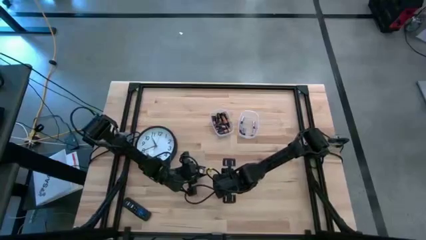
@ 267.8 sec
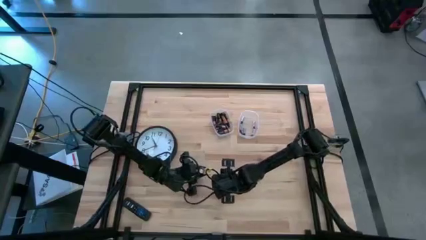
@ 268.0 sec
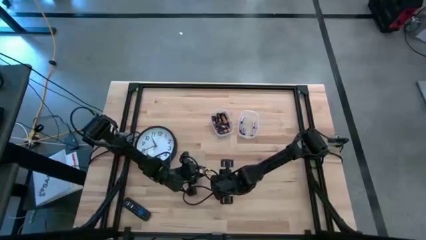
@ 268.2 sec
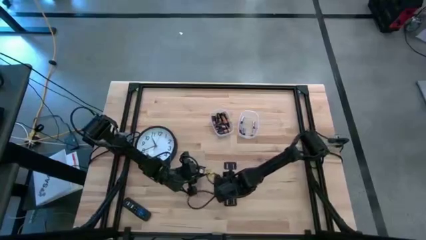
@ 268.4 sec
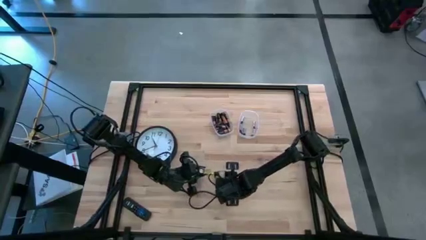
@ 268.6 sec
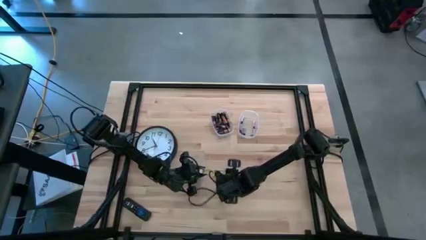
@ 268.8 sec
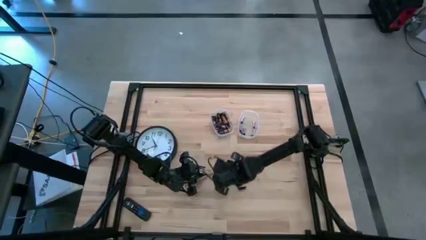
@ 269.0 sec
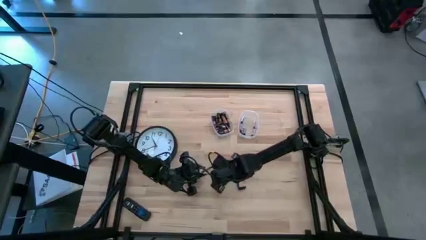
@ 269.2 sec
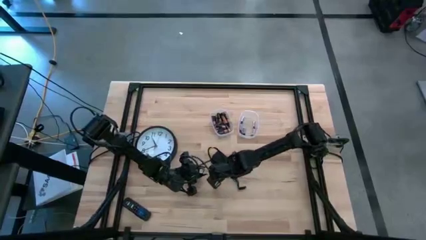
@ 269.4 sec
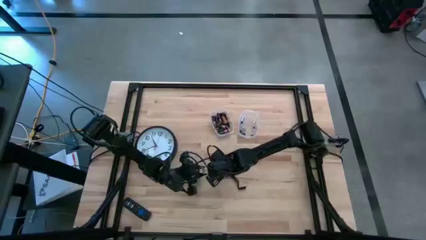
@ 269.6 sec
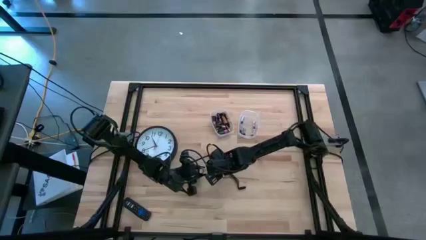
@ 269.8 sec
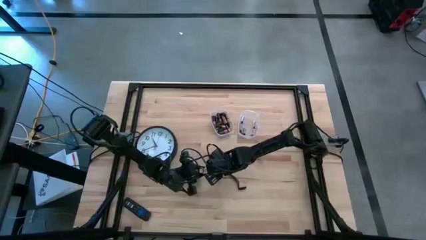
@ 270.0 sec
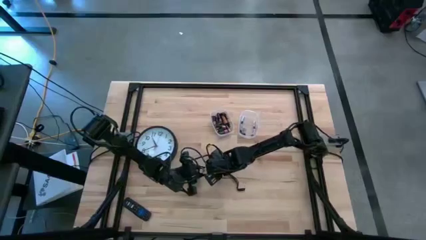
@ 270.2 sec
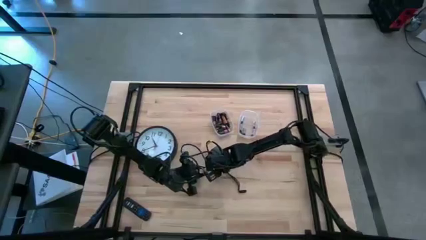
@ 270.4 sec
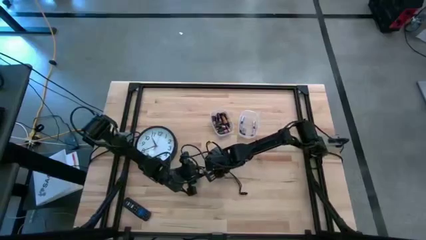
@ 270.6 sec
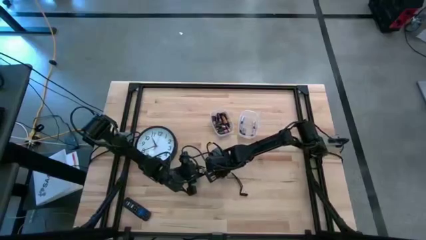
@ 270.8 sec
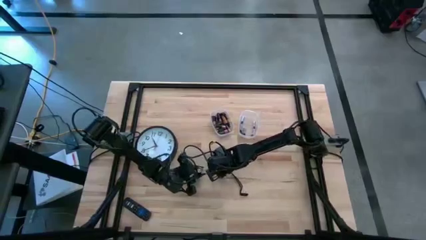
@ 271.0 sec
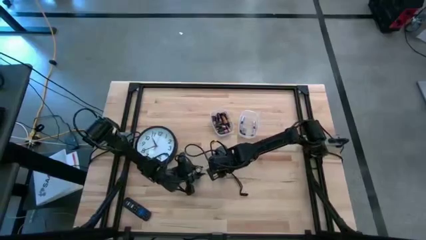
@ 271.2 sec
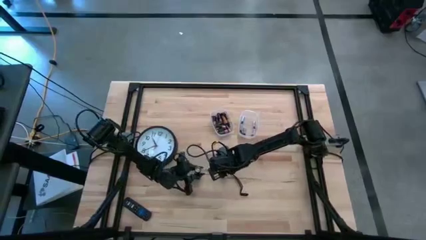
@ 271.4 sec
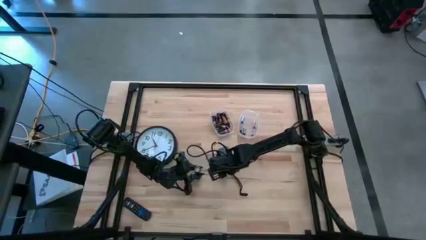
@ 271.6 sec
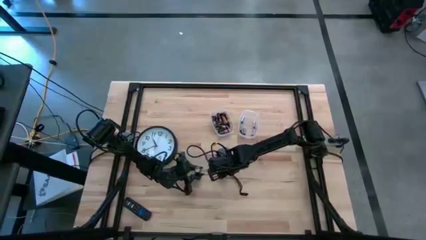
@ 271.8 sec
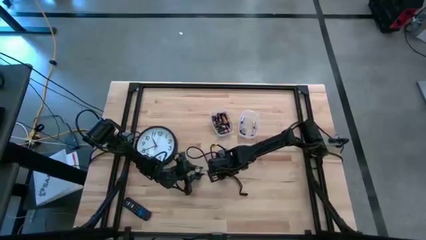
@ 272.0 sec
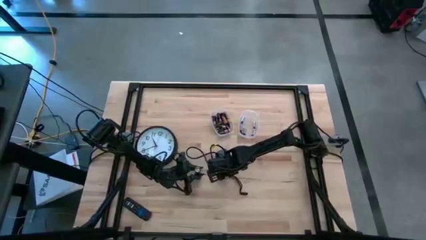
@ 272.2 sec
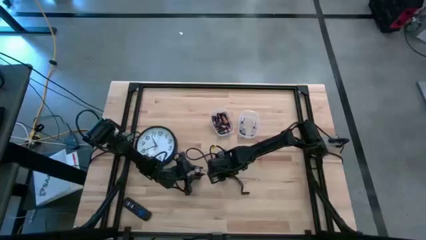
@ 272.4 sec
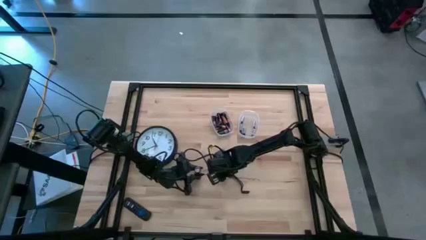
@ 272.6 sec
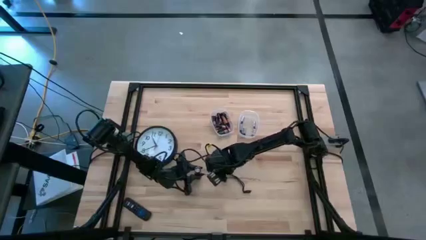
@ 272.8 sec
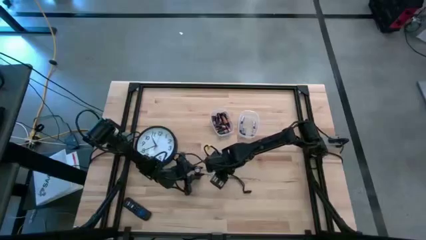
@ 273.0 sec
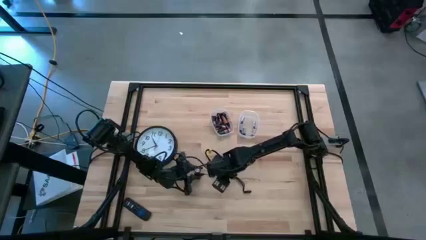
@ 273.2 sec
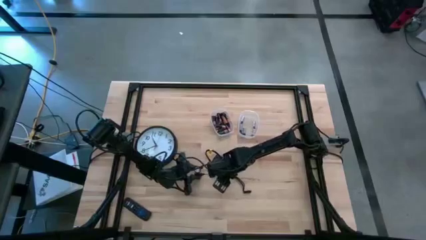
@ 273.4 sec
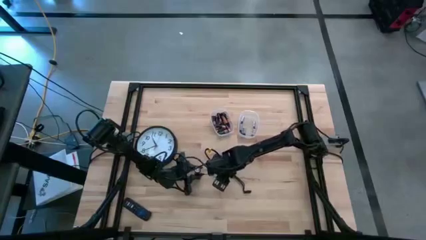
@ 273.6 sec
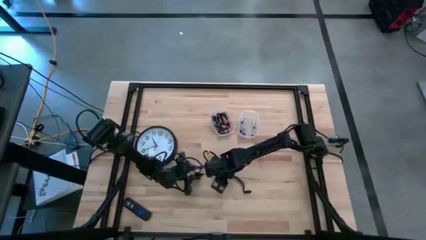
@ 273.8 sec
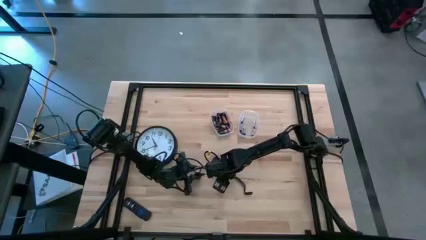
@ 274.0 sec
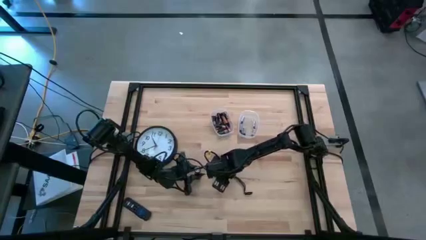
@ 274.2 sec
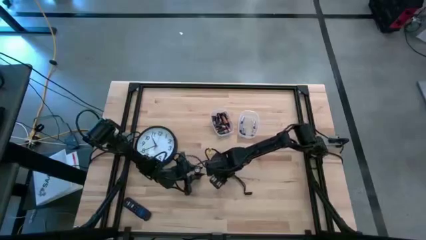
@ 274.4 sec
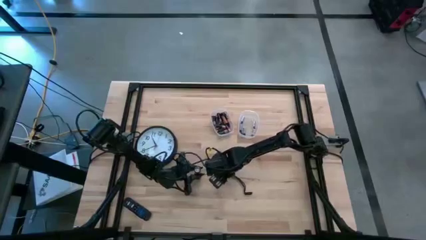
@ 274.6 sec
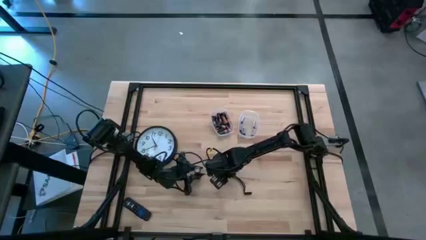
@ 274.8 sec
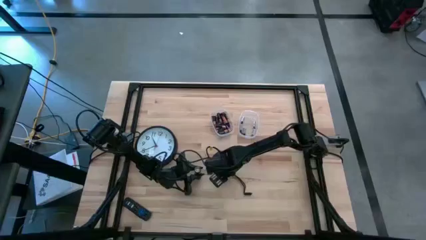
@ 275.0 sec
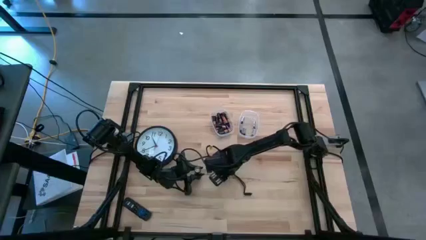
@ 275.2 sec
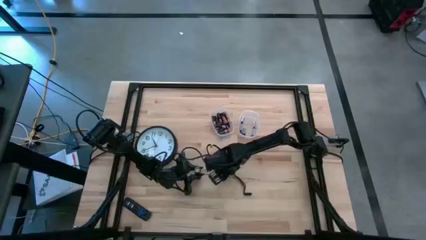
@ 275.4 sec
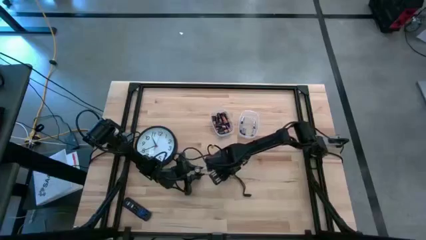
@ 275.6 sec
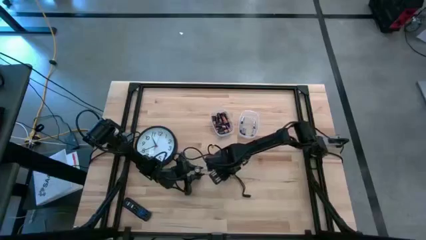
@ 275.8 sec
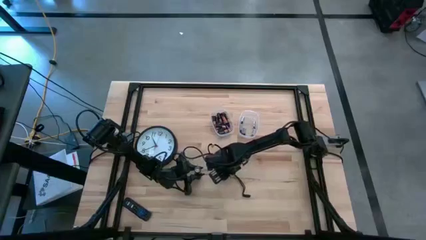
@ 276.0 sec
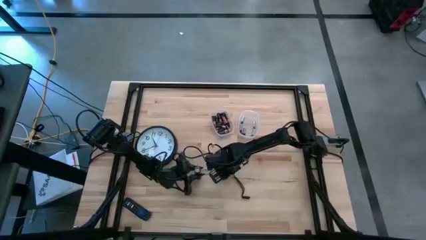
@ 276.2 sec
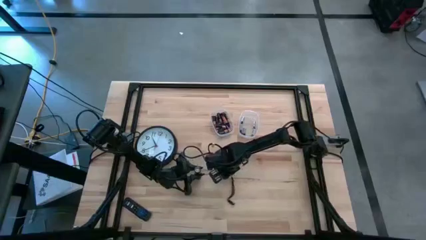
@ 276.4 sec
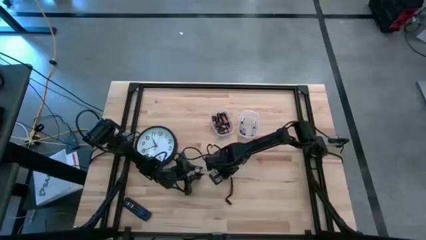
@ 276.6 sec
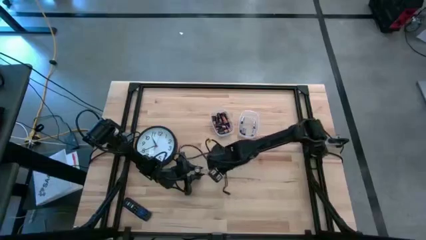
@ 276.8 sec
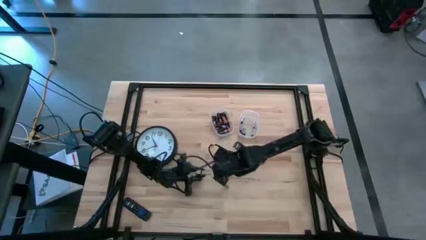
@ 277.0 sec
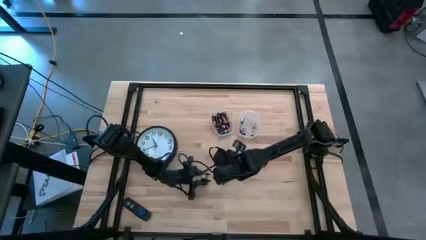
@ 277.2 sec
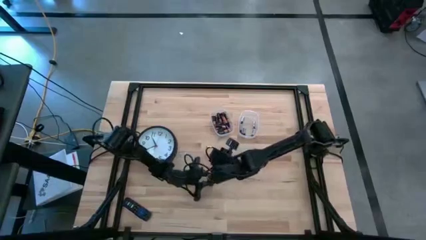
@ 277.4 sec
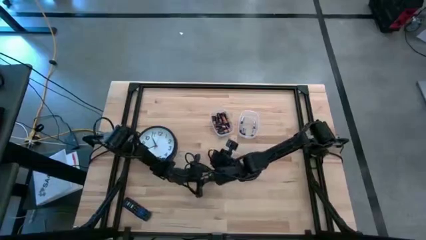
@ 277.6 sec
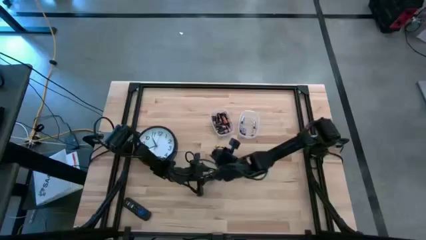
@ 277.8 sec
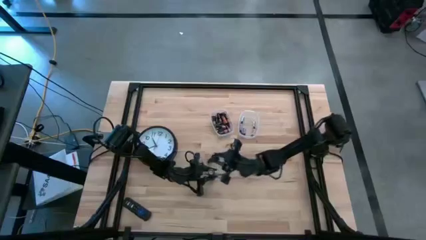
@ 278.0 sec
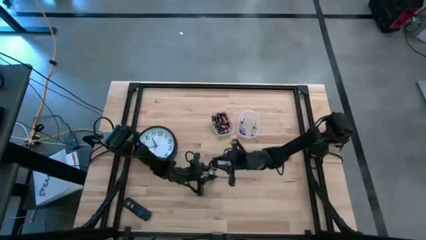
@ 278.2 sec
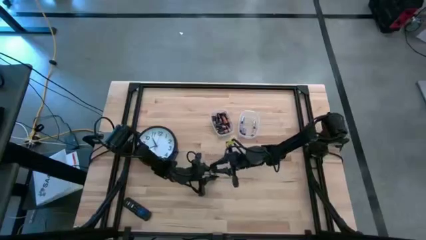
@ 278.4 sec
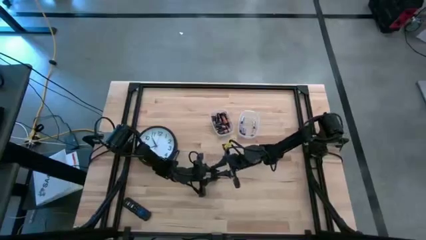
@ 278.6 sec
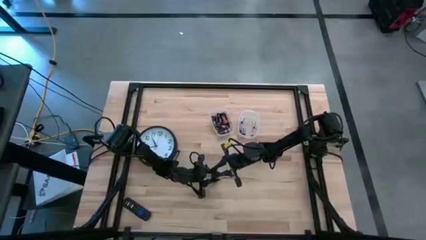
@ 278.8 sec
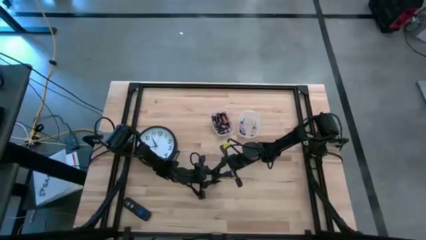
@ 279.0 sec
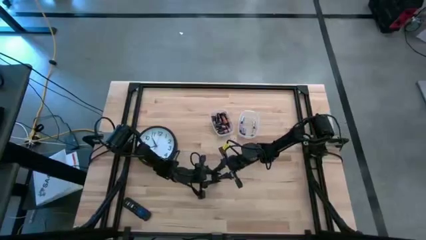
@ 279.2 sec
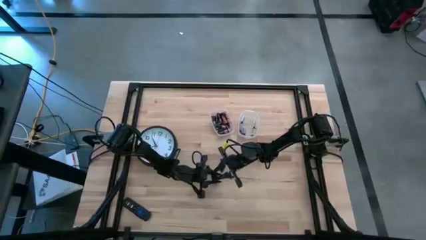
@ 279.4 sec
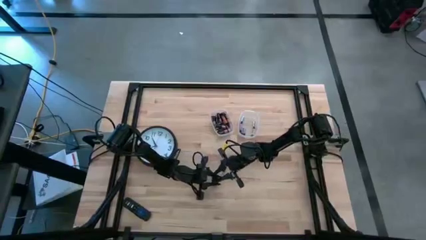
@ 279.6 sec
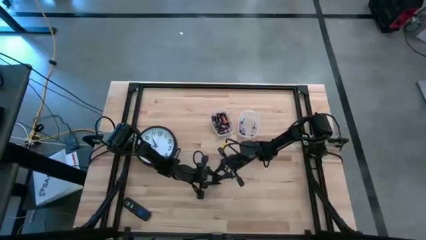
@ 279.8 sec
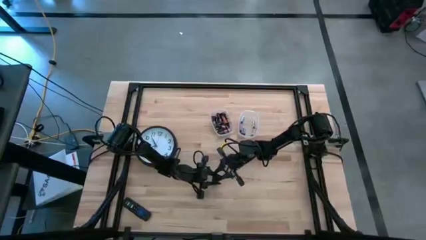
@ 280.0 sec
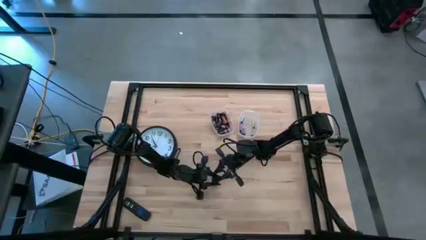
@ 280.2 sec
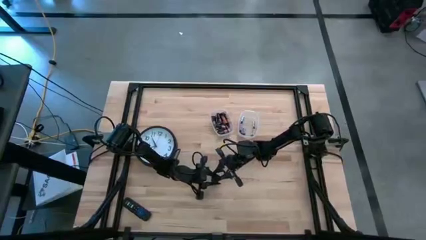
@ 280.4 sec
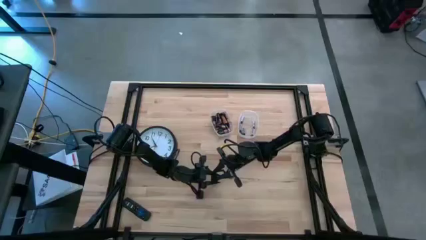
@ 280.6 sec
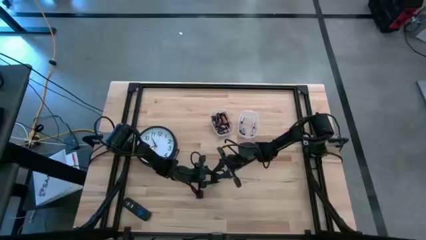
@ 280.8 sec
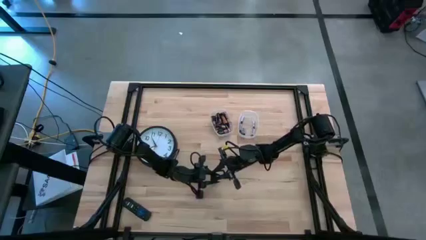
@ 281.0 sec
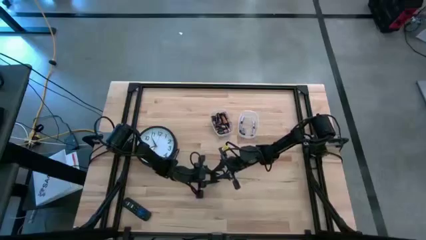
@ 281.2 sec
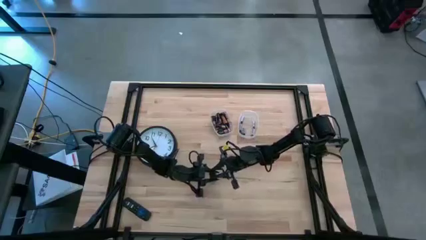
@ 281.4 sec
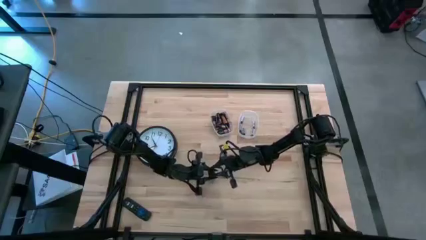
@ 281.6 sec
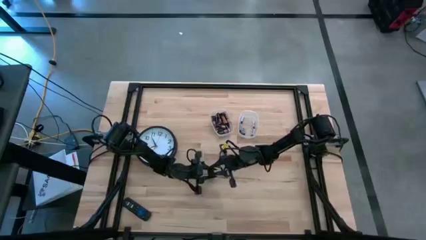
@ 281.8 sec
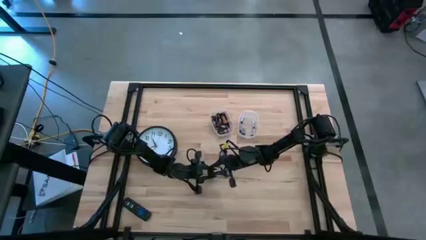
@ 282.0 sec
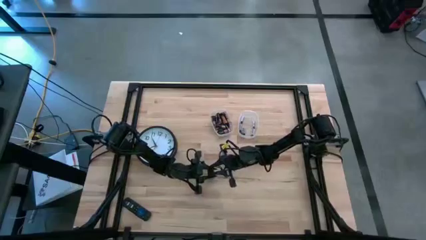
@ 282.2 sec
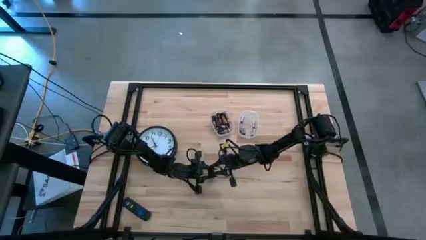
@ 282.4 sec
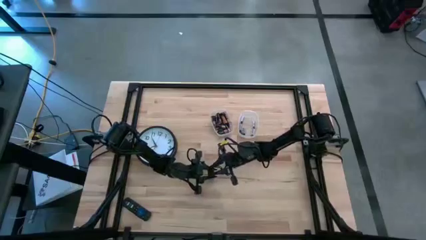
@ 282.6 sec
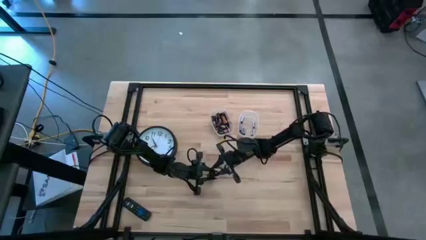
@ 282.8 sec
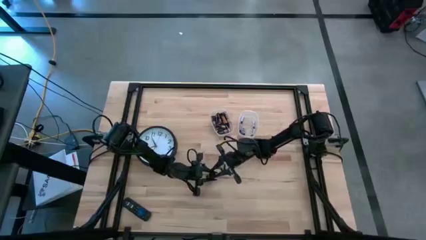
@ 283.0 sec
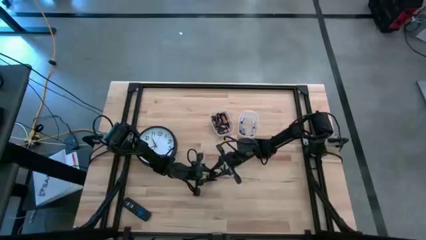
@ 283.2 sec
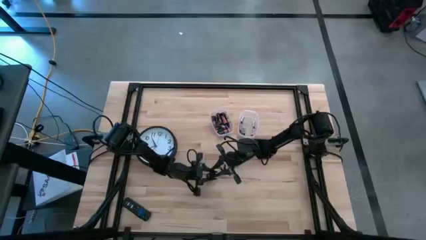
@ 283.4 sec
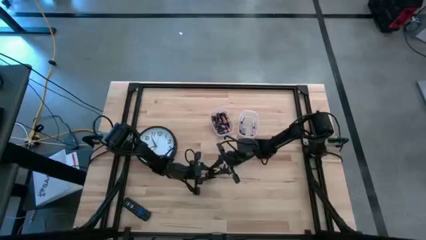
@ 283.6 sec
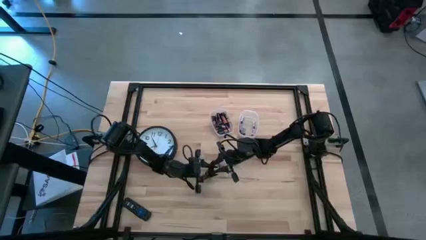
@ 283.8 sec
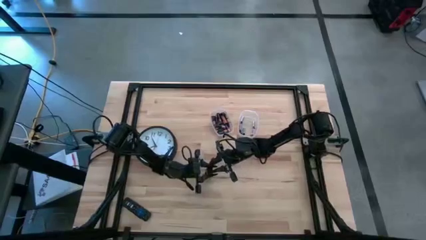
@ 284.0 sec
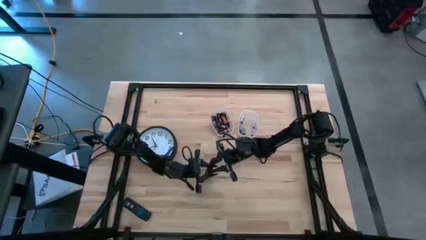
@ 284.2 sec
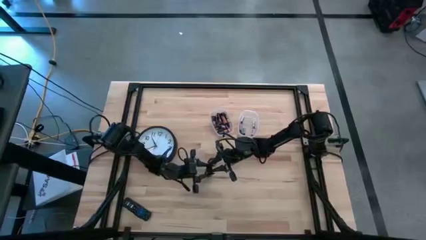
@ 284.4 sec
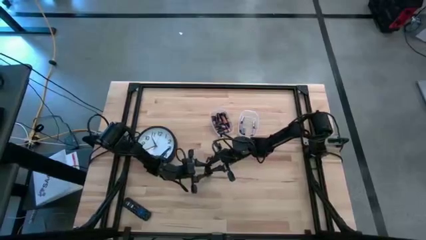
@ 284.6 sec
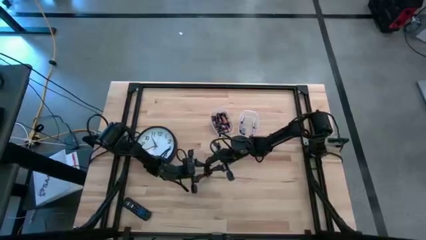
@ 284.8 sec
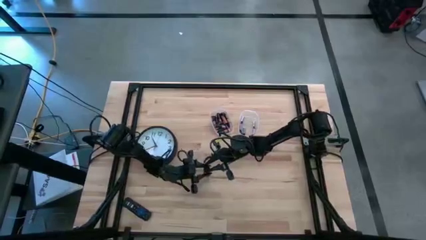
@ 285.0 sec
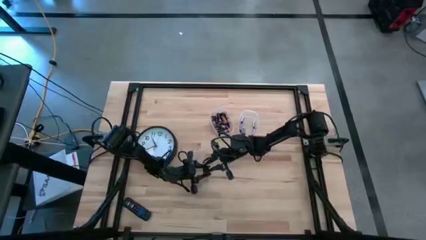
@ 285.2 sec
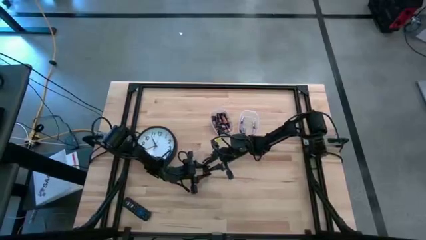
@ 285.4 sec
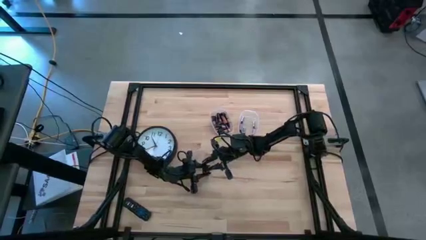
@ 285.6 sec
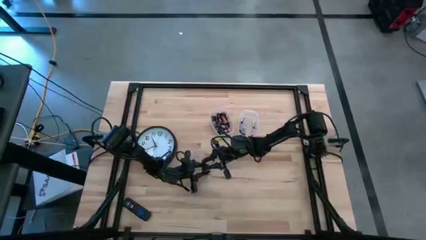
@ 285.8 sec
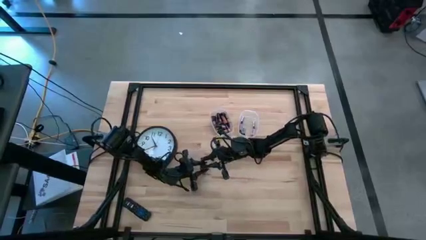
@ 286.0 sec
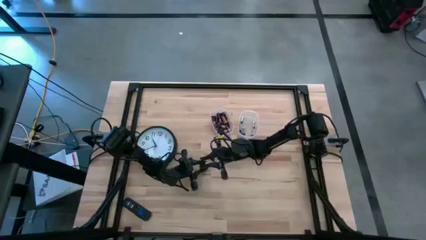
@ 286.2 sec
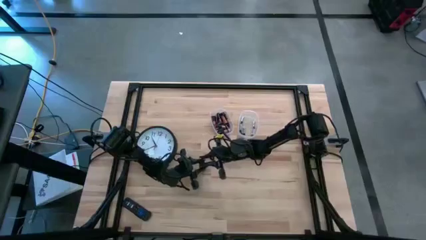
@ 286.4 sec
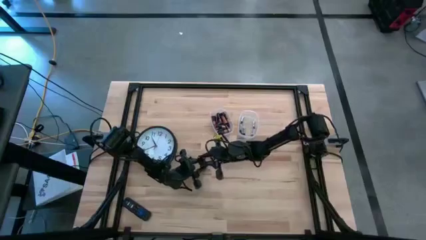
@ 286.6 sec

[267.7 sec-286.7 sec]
Task: Insert battery
Close the lid of the black flashlight
